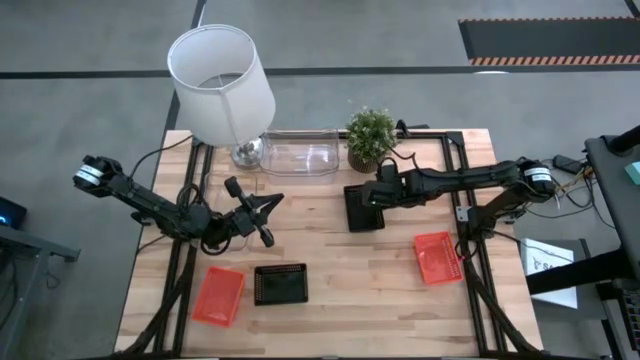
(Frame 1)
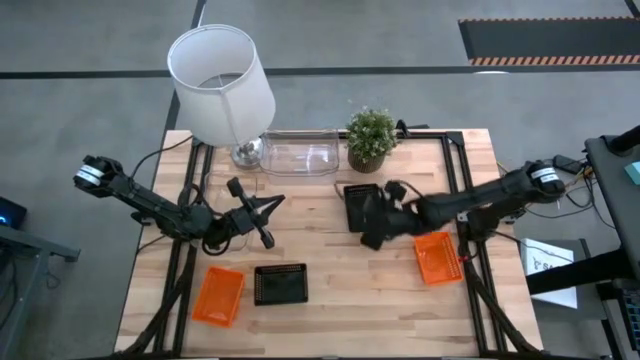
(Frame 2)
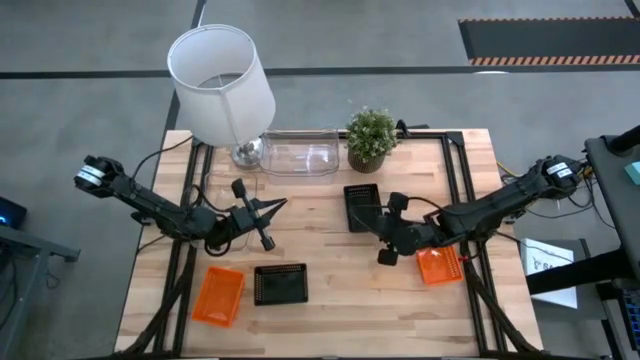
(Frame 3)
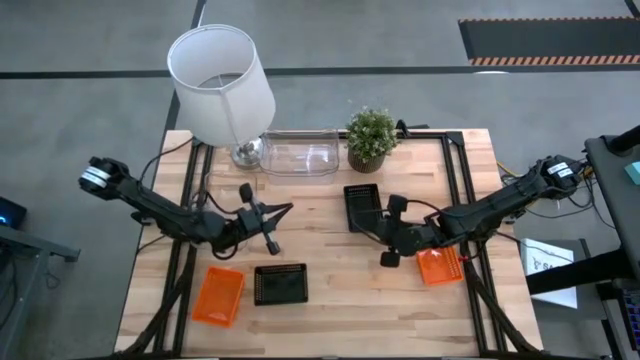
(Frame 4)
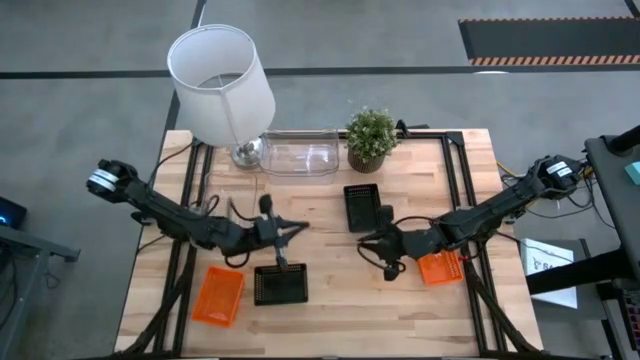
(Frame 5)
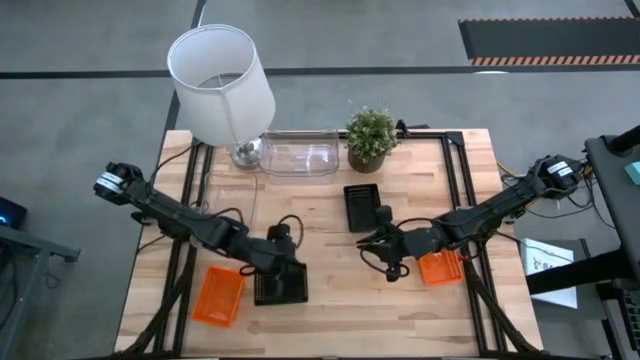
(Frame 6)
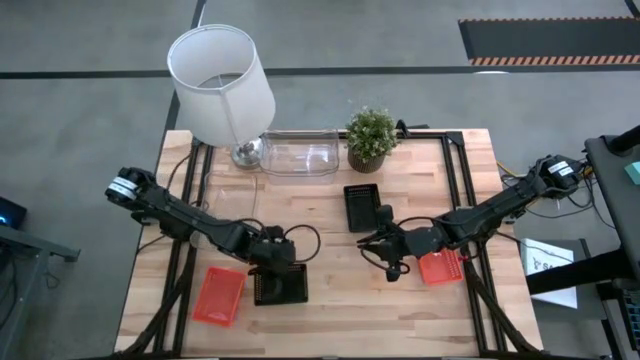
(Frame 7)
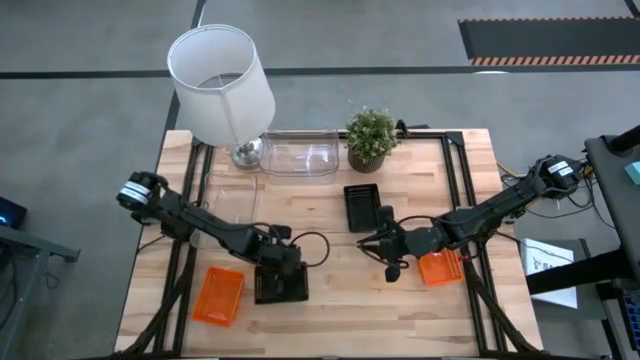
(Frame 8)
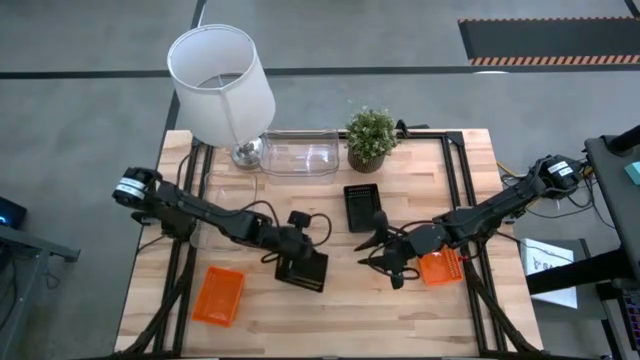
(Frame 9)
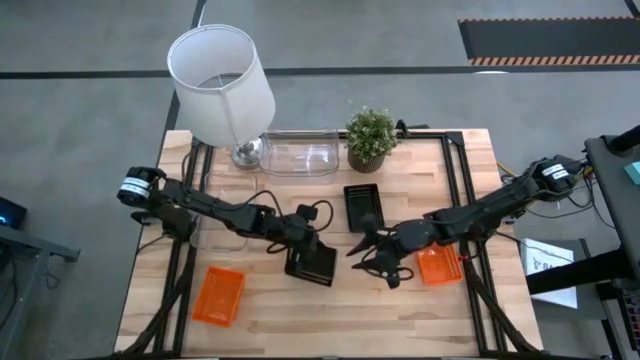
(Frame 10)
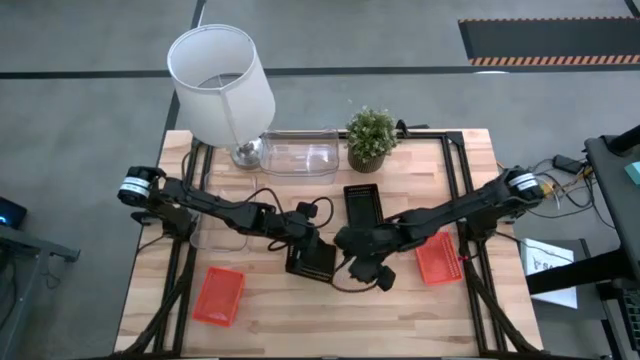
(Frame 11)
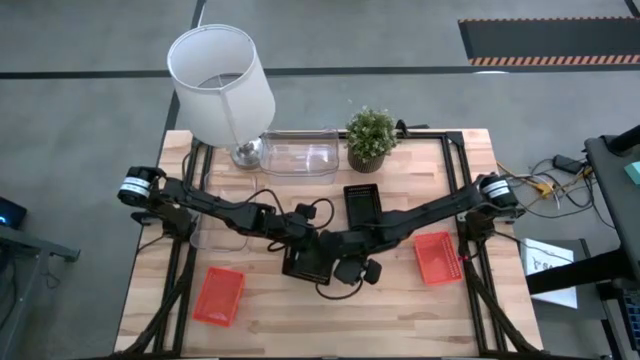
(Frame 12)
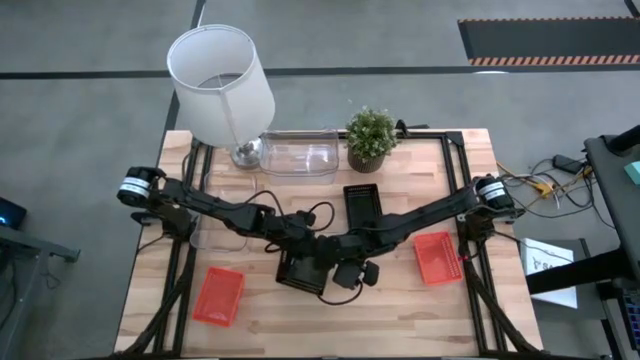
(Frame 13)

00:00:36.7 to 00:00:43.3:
Stack the bottom black bin on the top black bins

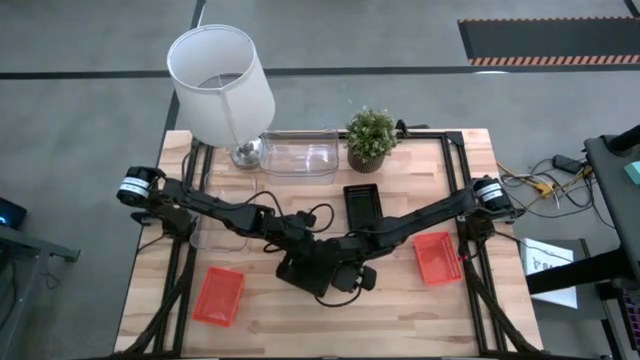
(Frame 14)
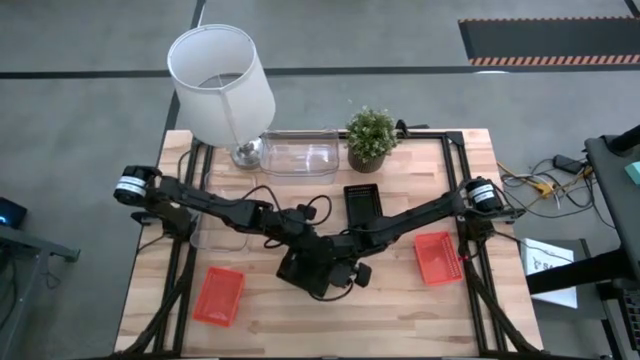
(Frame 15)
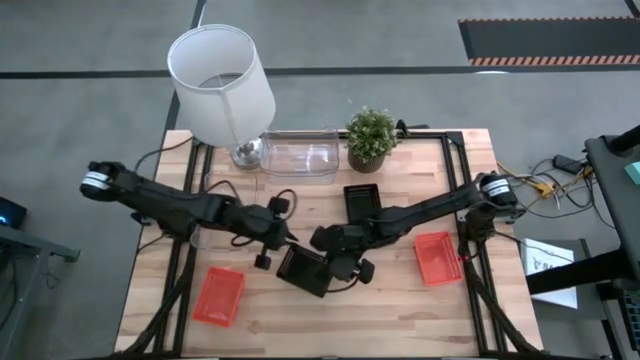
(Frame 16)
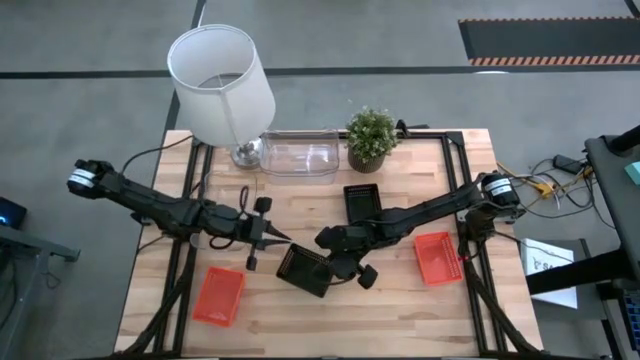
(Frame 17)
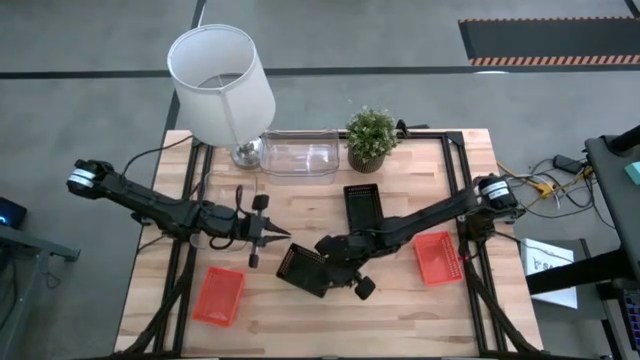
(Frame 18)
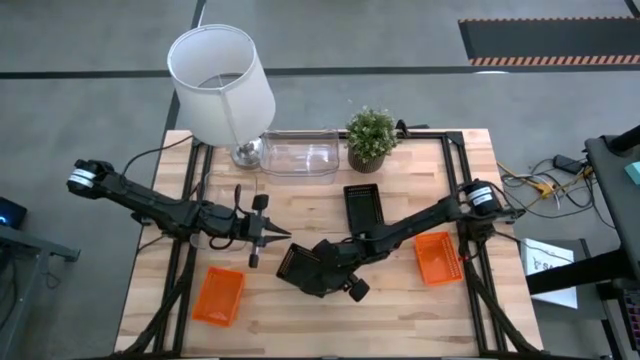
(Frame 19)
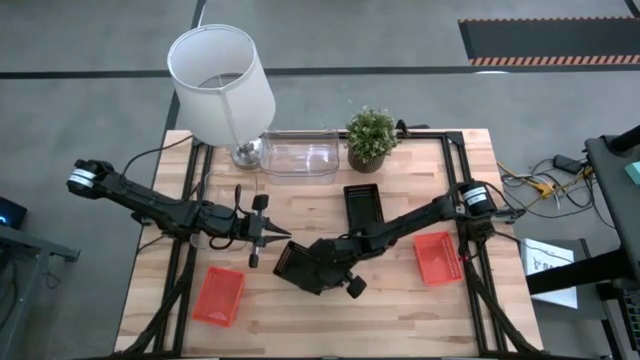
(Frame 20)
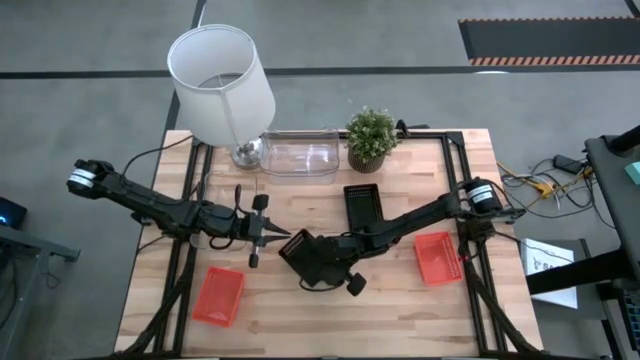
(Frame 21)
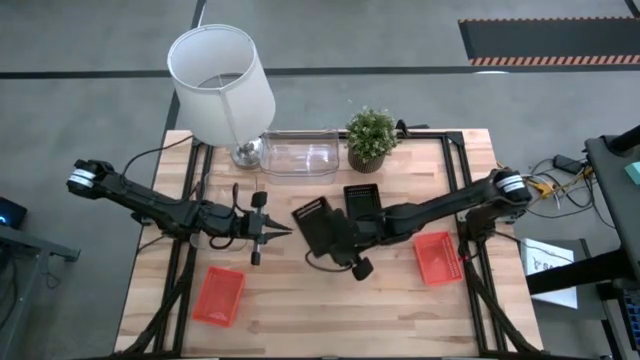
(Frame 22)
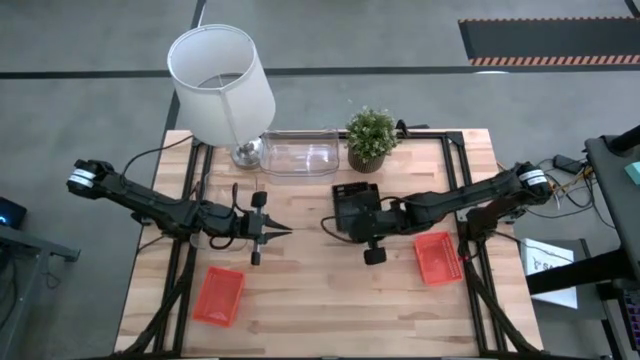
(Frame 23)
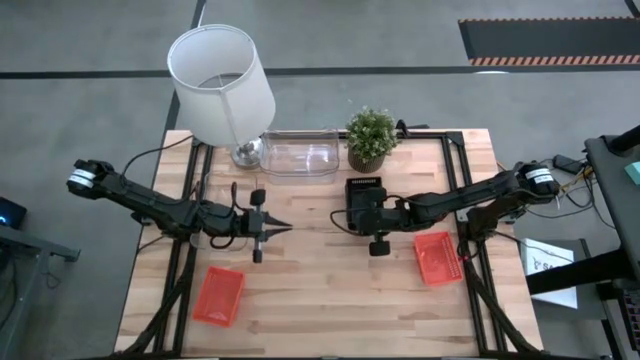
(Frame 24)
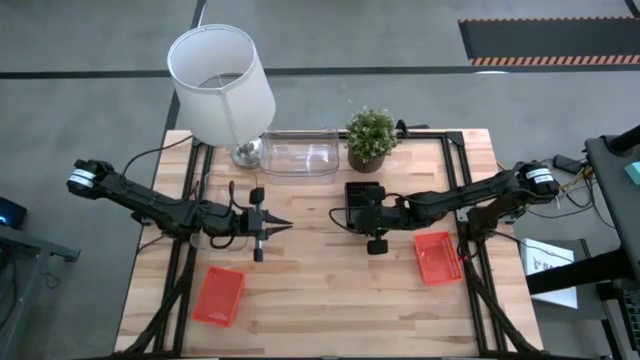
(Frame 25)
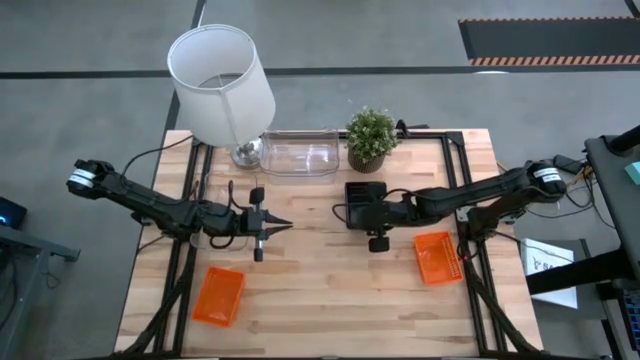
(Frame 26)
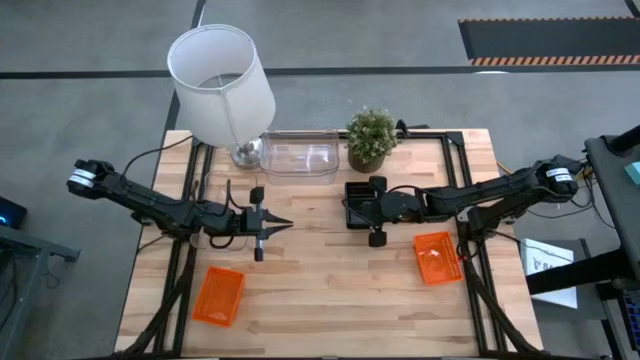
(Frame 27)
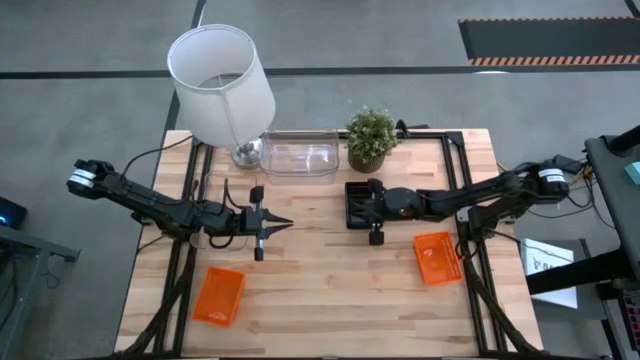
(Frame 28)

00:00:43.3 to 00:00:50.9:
Stack the bottom black bin on the top black bins

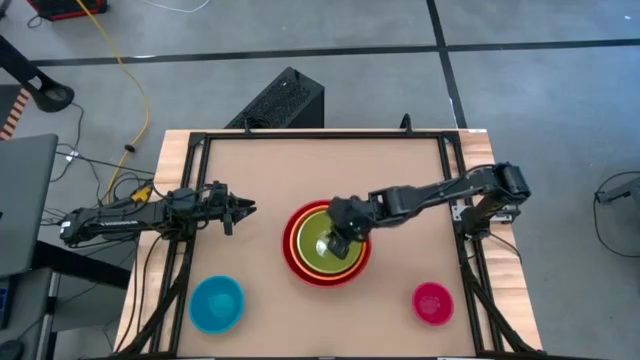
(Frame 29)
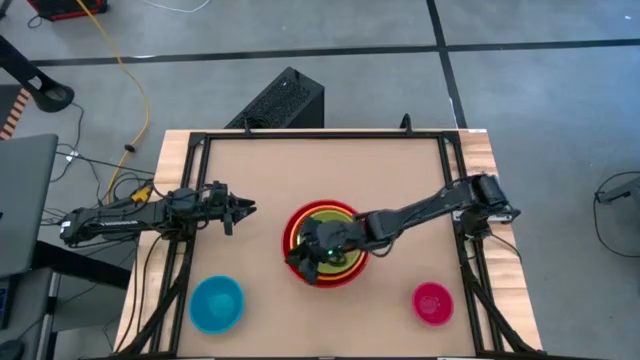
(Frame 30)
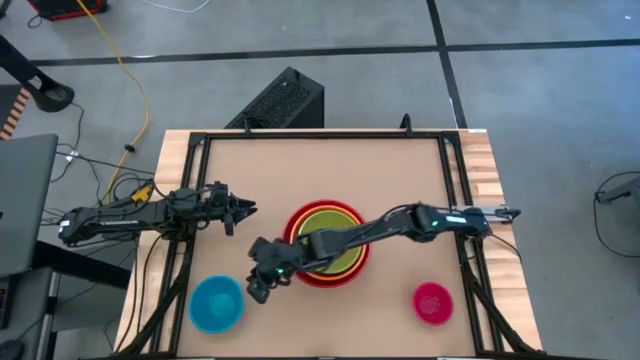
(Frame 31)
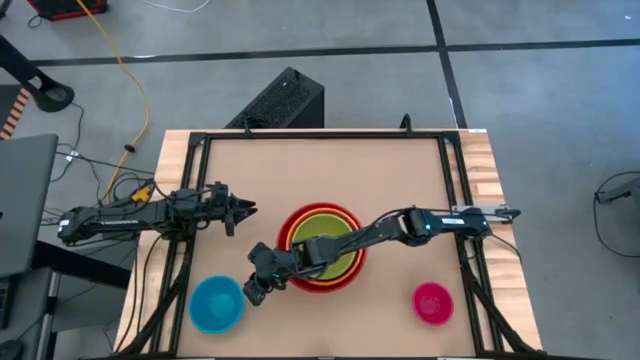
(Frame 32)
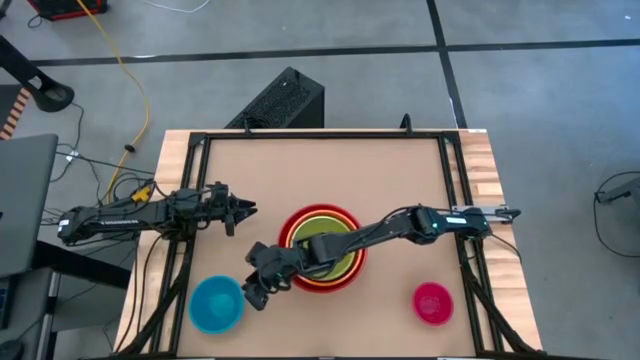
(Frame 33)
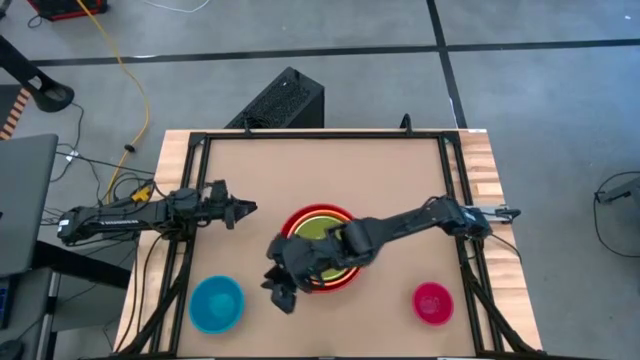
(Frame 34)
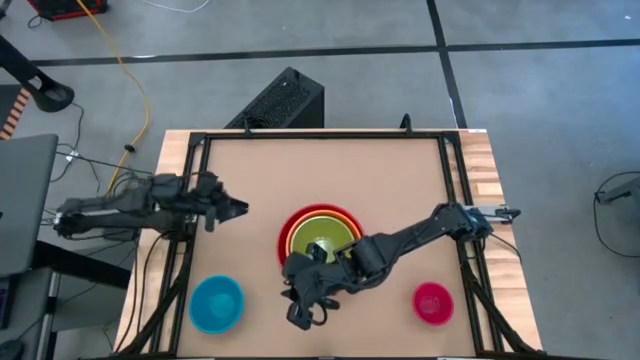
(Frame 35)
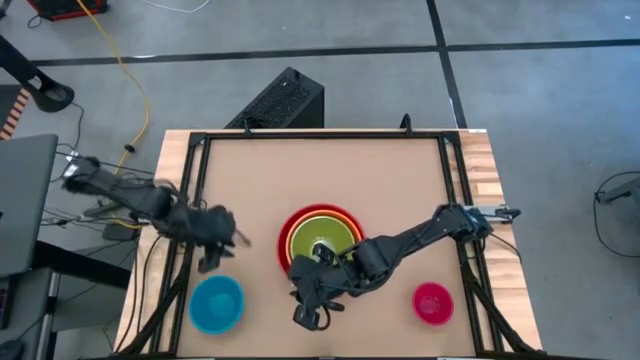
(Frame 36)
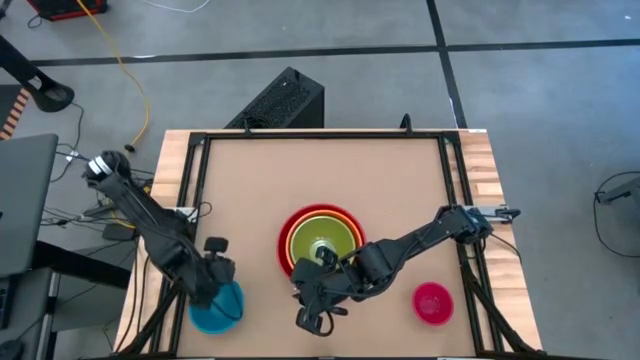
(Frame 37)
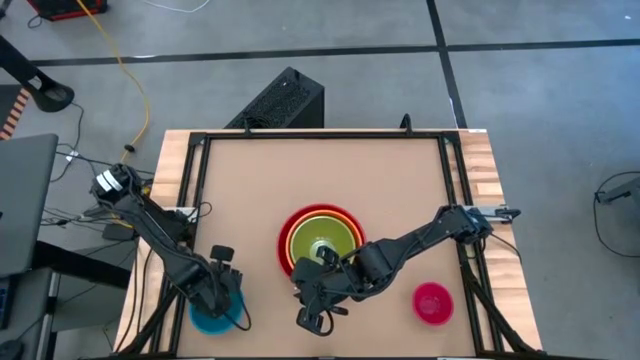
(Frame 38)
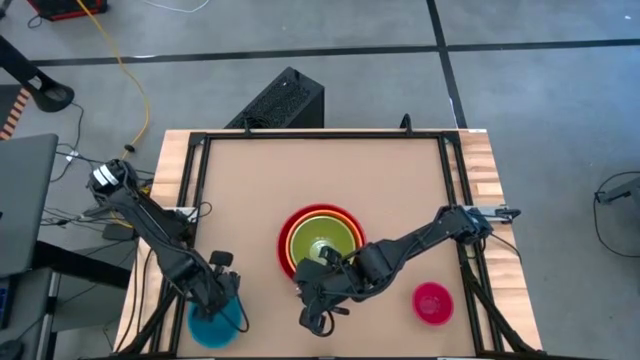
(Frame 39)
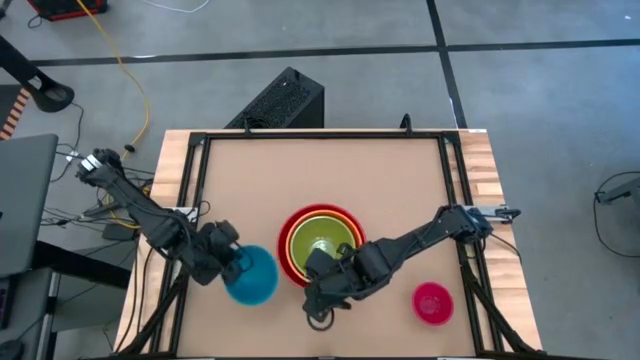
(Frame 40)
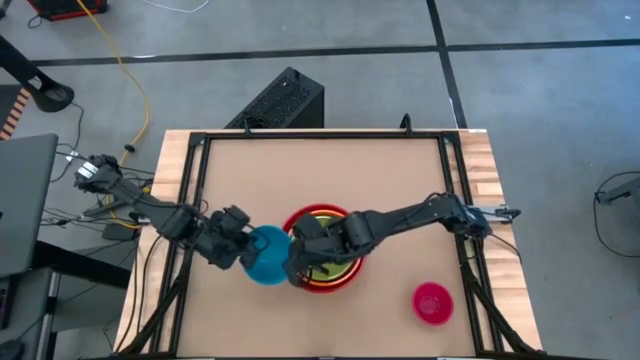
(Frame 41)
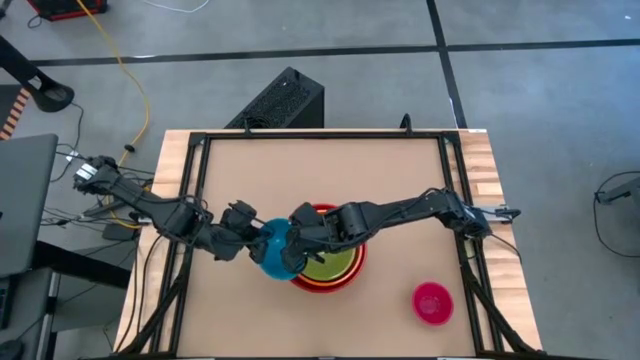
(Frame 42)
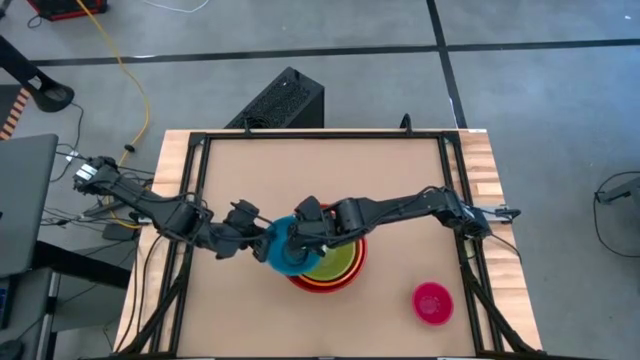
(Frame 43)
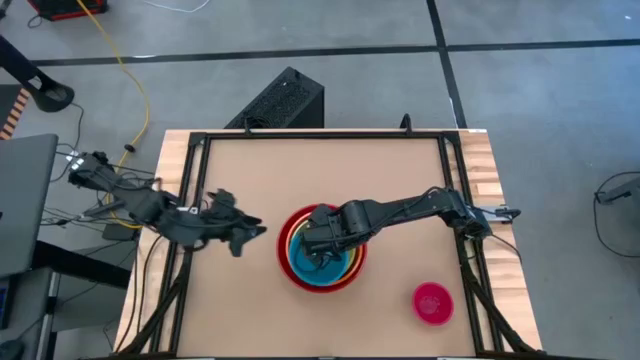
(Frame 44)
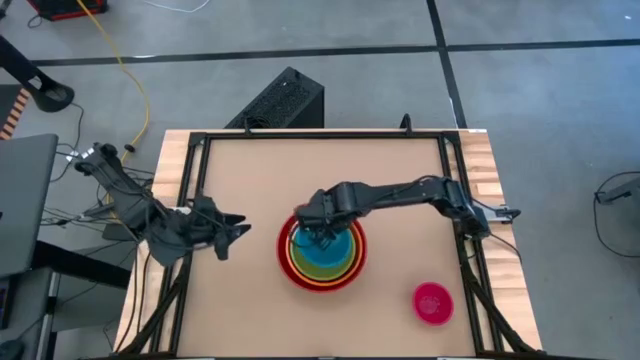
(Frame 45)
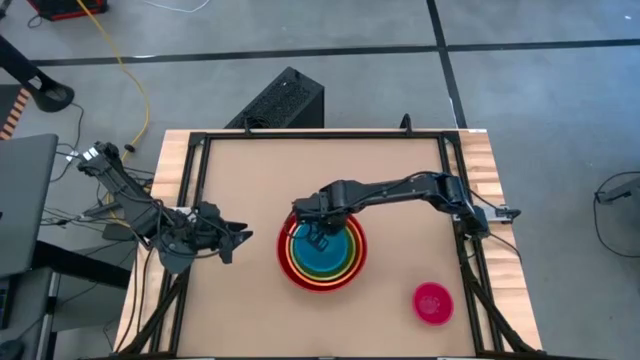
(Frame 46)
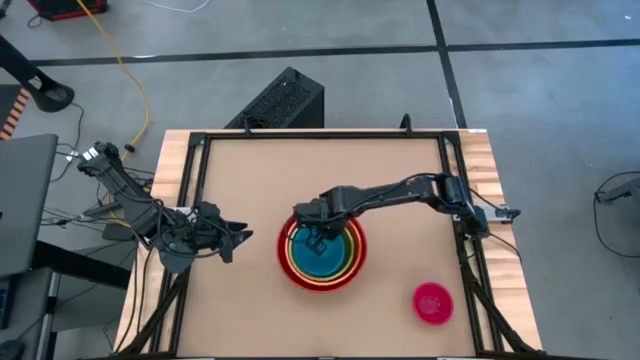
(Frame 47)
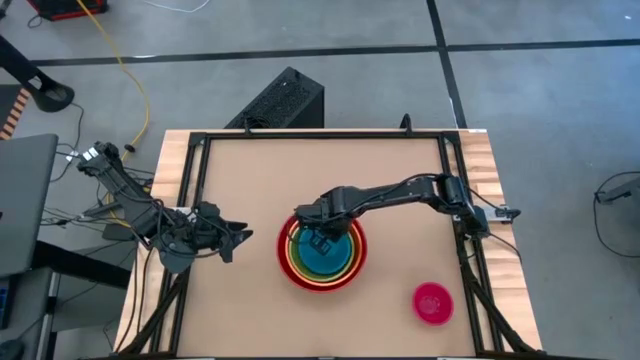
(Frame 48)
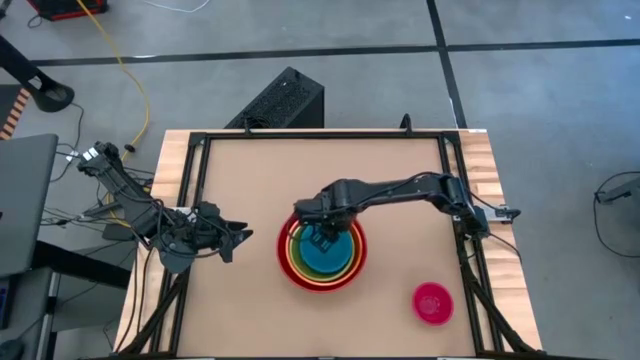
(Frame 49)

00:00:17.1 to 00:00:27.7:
Stack the blue bowl on top of the green bowl
